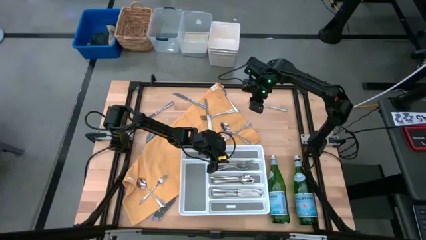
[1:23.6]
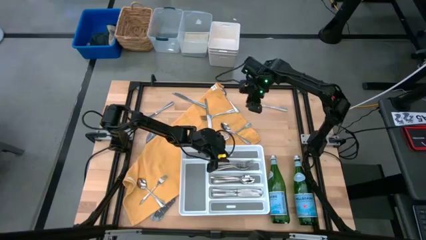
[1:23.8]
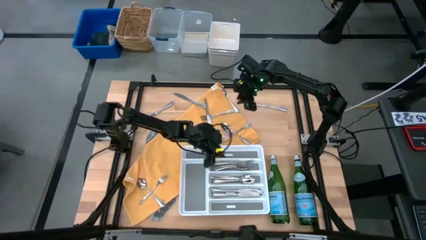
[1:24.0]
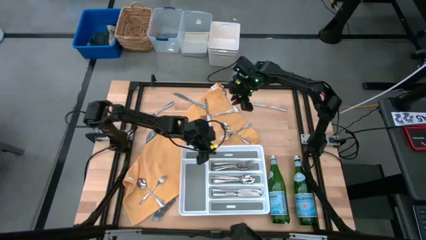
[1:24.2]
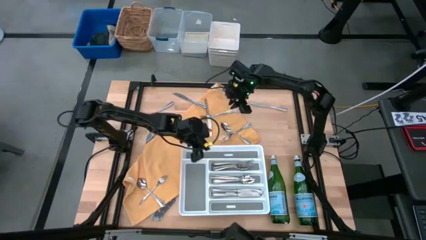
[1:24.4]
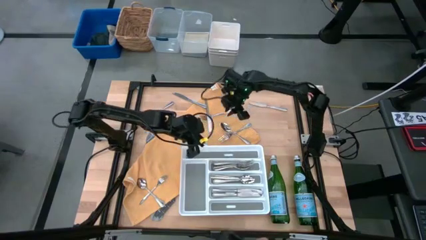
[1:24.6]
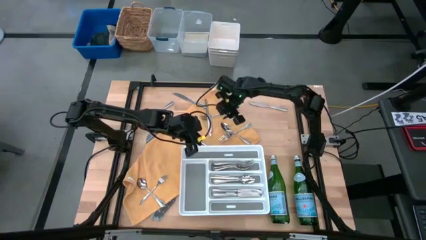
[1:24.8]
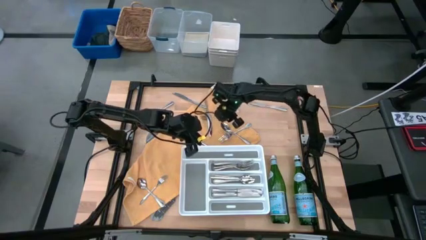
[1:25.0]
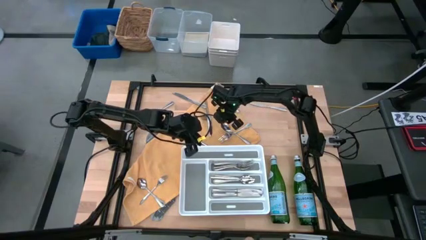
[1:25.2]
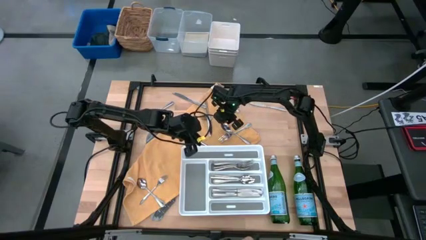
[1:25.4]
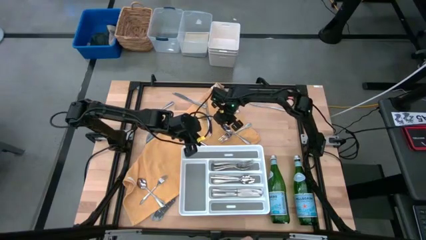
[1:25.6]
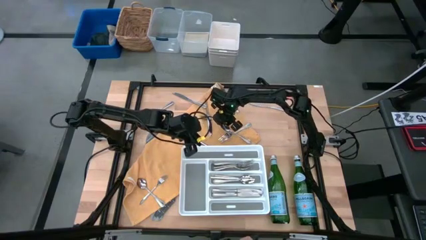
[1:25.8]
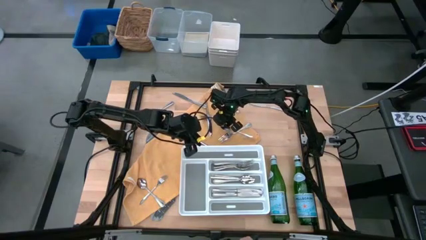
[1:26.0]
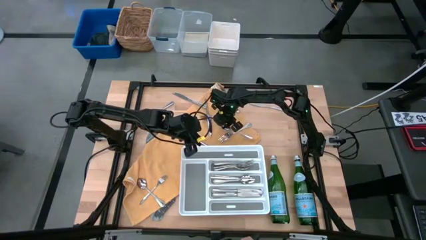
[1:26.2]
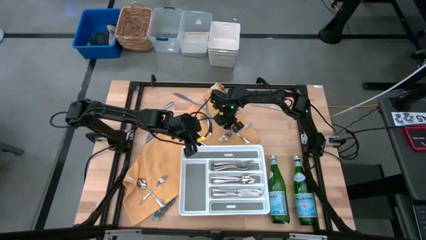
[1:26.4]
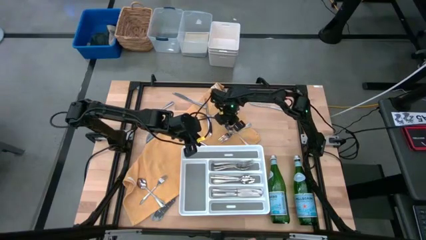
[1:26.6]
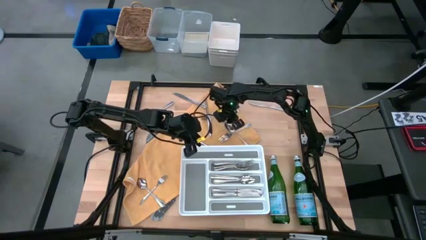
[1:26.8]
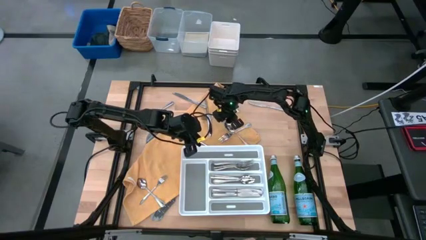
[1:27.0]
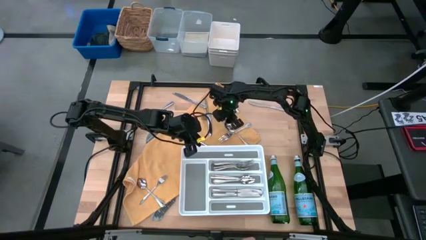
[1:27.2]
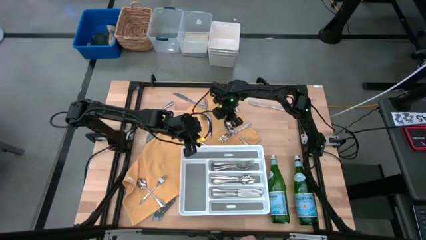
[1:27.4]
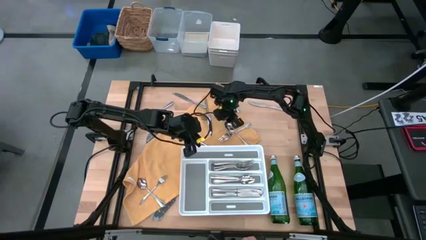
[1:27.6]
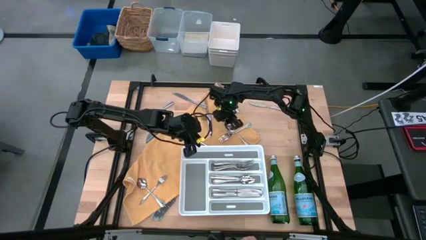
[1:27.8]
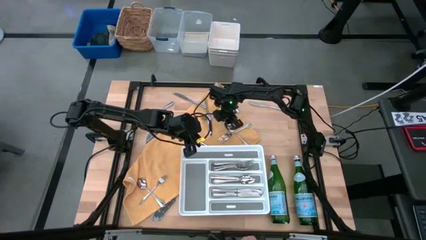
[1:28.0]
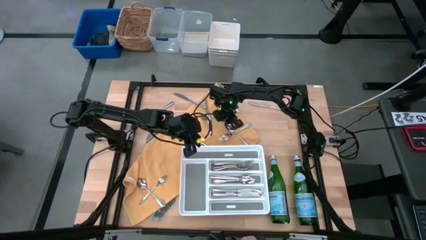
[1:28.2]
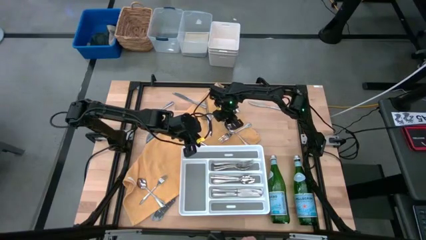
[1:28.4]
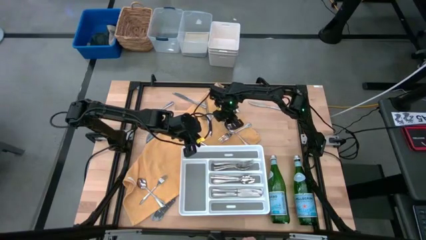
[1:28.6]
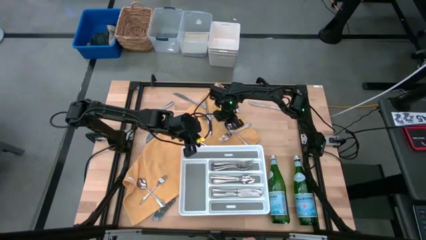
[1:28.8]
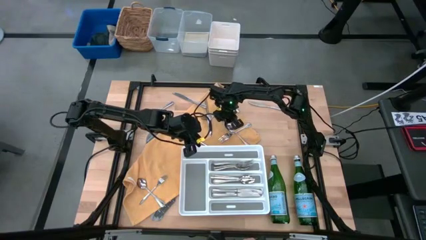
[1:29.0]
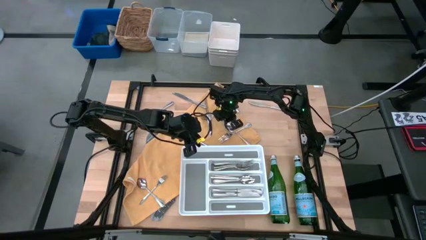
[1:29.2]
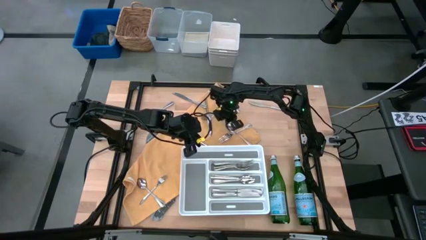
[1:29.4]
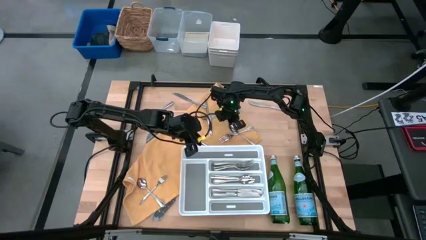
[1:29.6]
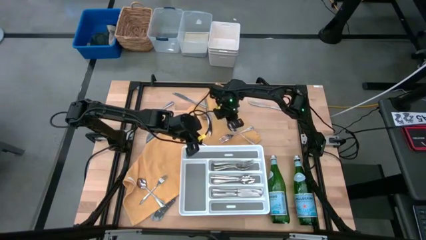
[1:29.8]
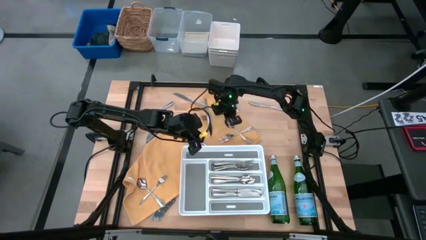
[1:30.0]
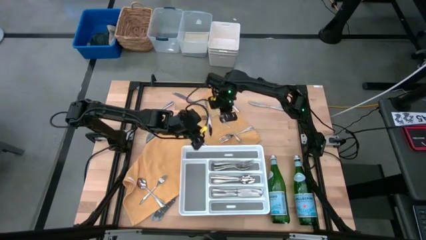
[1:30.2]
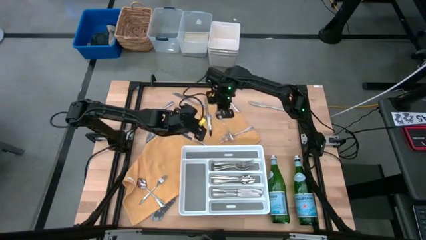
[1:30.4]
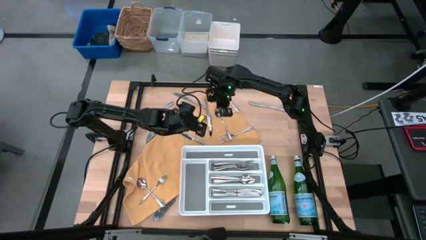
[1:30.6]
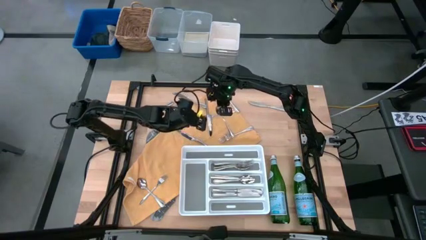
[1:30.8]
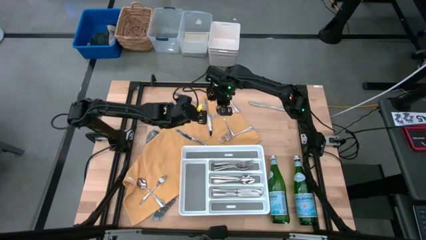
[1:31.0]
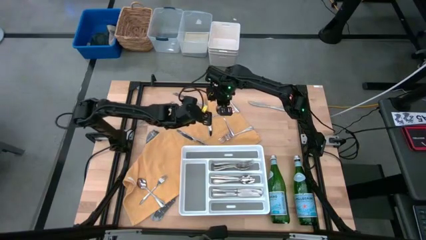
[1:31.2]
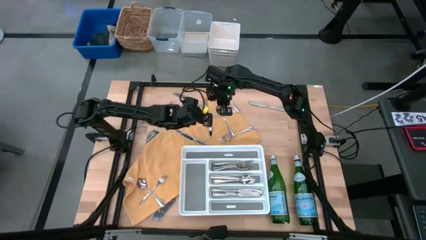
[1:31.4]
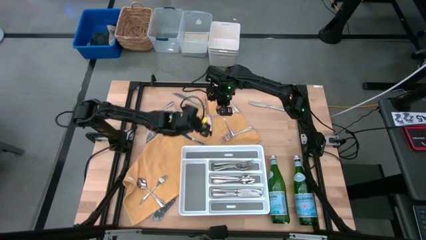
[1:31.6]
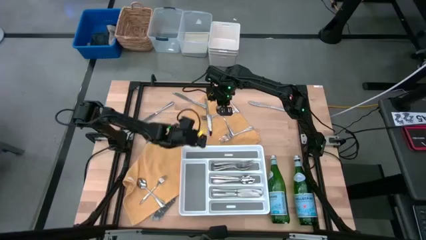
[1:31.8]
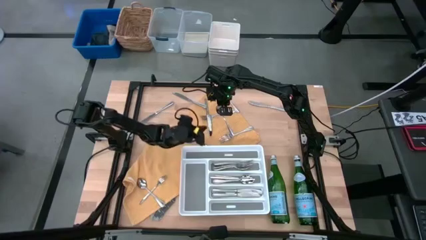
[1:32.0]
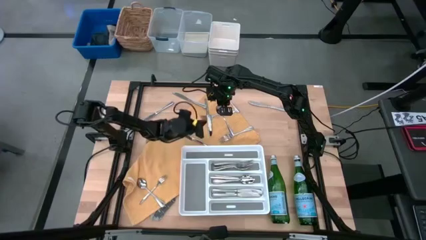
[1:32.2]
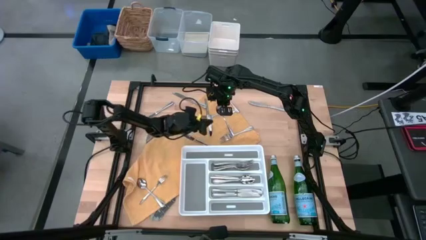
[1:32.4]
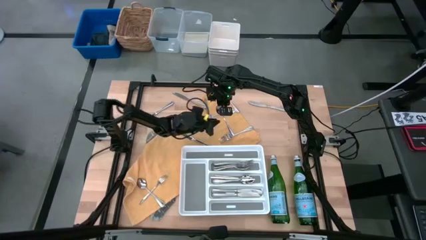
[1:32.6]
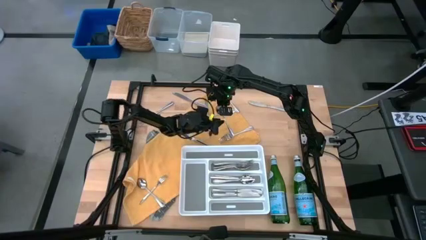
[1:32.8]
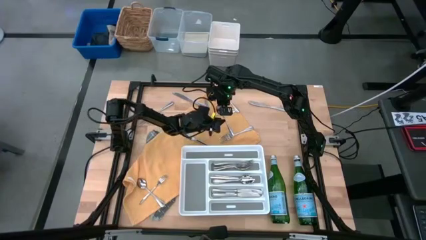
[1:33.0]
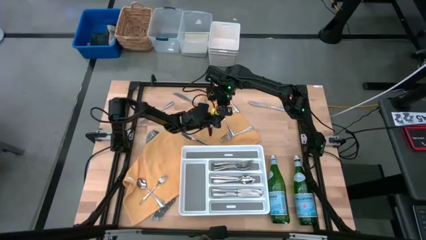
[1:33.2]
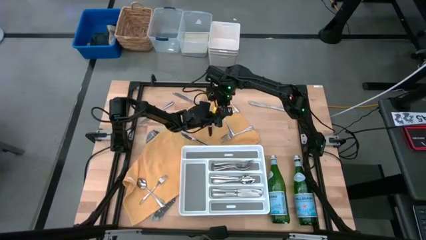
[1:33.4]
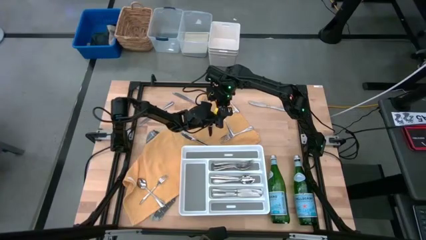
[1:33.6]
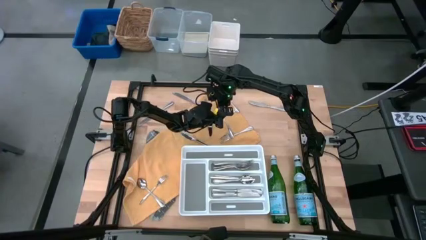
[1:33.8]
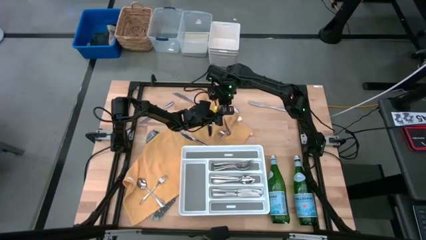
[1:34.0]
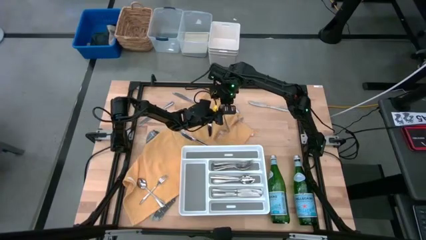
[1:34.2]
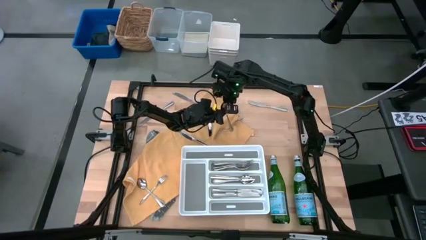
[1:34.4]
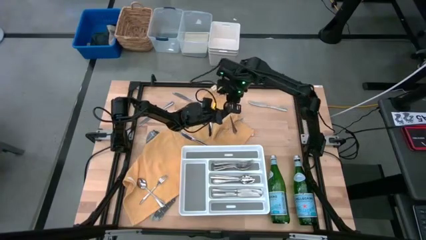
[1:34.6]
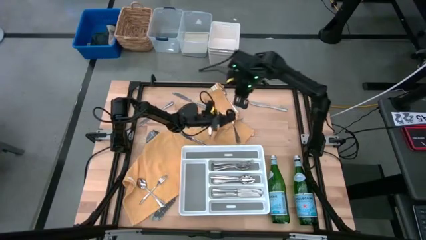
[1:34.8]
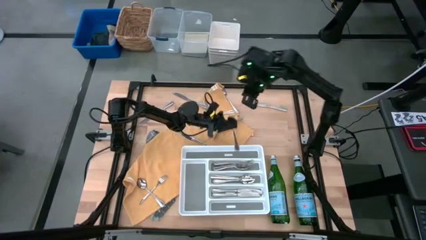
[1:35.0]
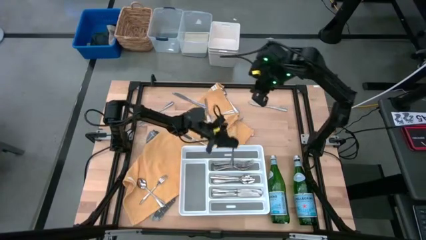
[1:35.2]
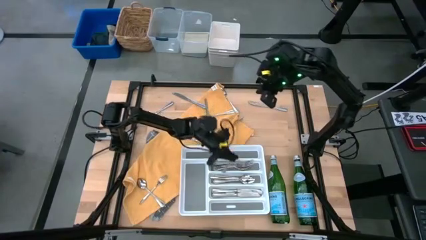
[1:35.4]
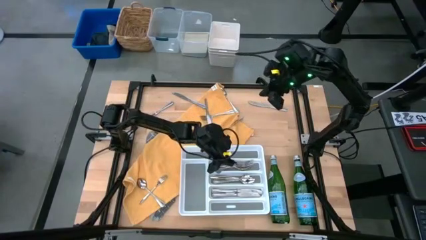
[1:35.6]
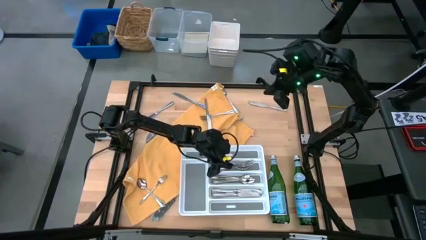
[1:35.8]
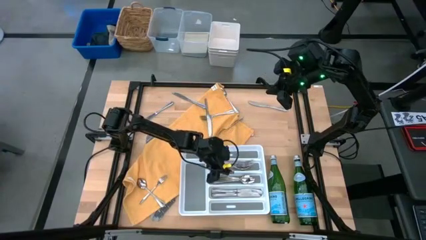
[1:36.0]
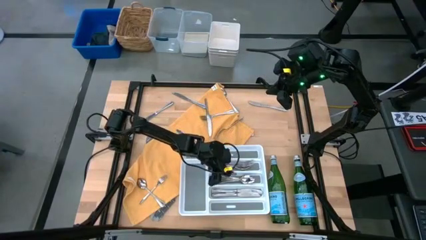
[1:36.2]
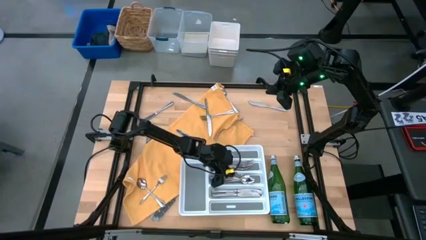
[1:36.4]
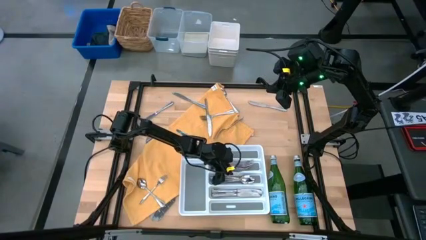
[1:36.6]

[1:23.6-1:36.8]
Task: Sort silverware
Put the silver spoon into the white silverware tray

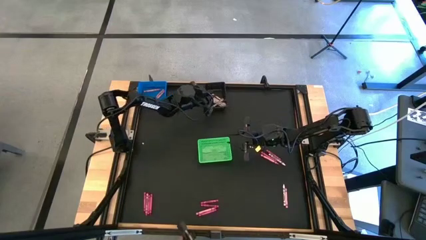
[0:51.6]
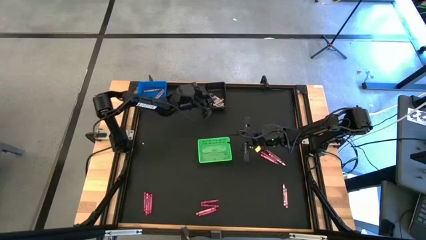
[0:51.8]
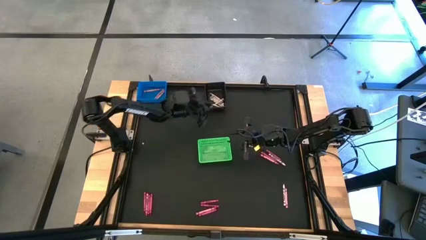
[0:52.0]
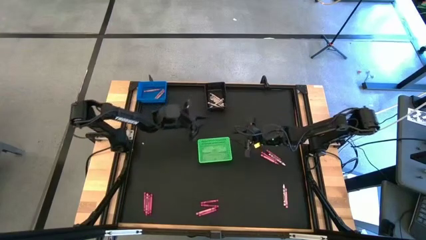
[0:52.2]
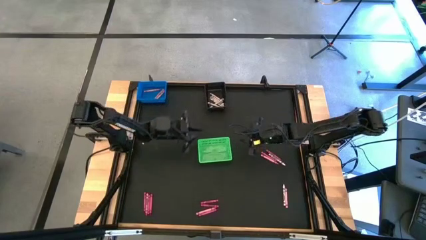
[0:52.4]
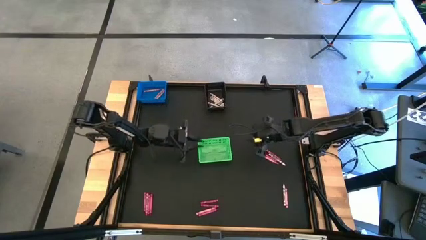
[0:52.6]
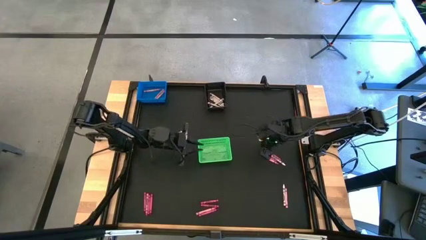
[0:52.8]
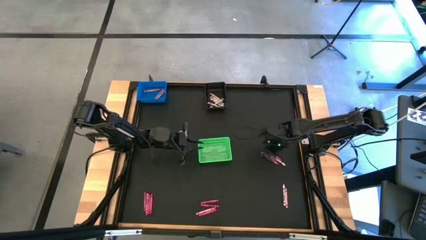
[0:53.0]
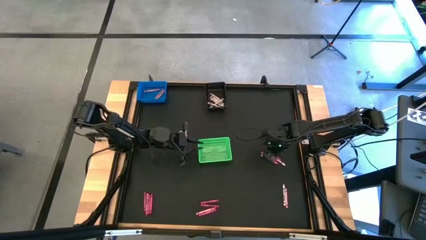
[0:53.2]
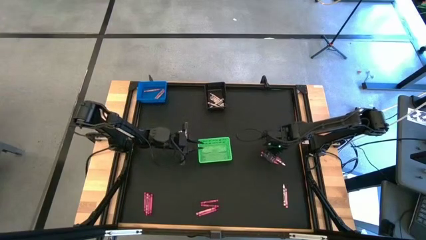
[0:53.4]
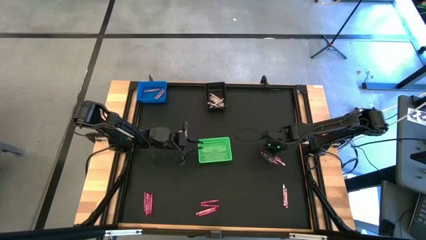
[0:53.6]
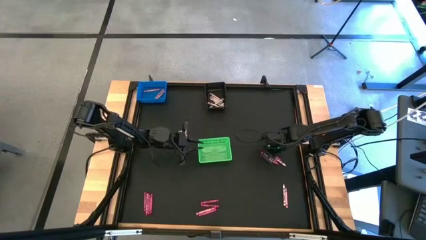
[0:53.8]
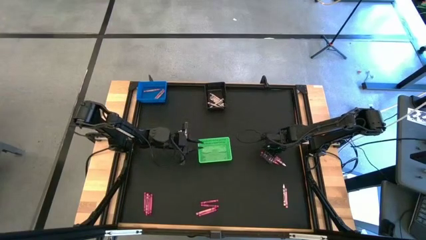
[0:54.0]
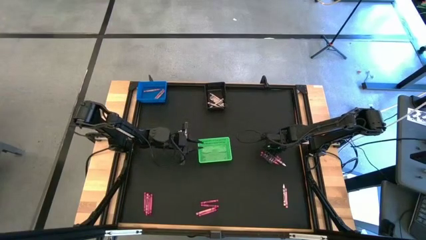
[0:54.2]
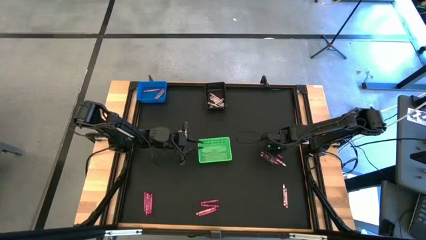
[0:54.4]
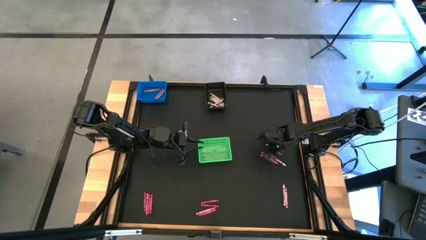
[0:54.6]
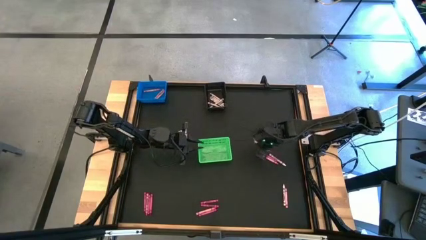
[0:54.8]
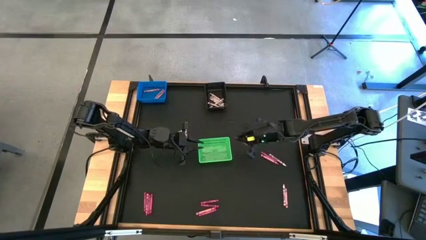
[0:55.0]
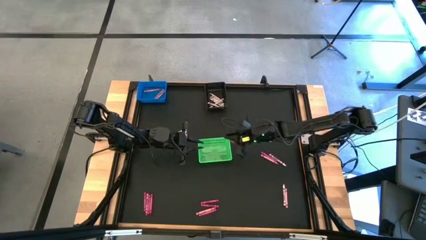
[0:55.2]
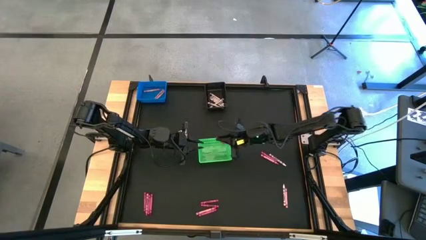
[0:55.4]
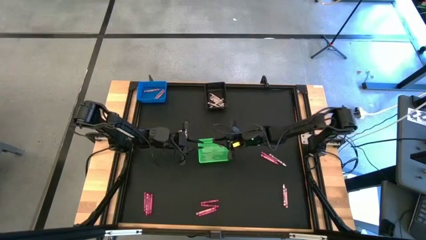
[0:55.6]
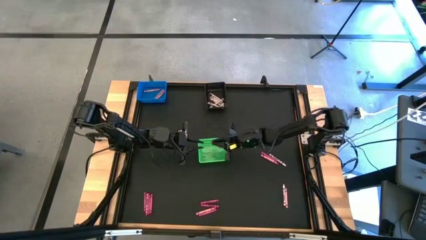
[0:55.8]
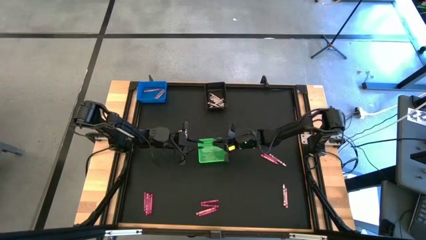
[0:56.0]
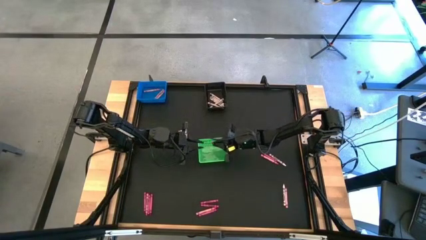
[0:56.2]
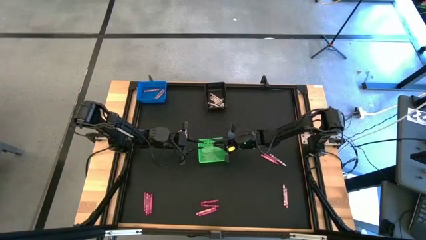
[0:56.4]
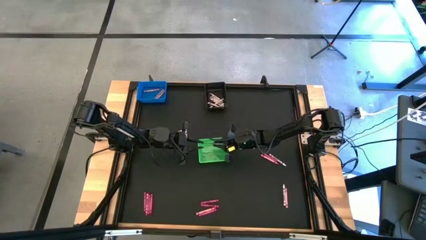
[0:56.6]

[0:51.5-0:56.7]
Task: Sort crayons
Put the red crayon into the green bin
